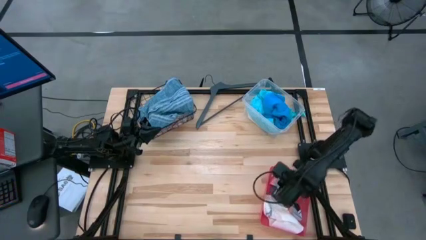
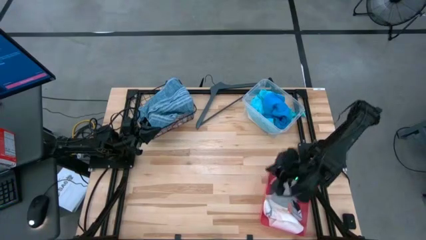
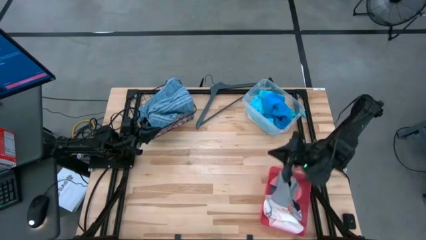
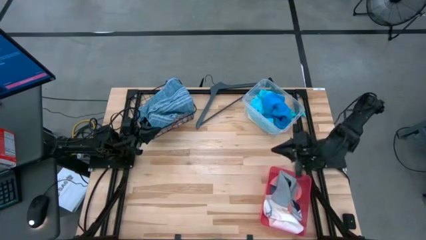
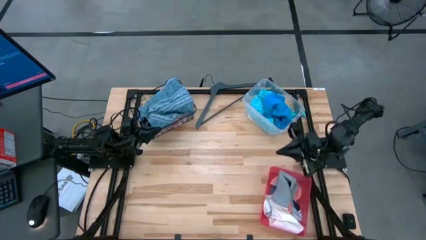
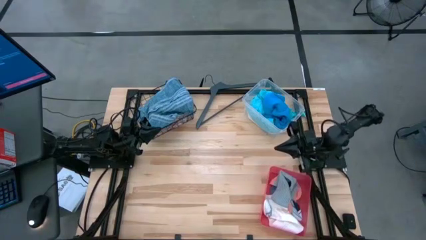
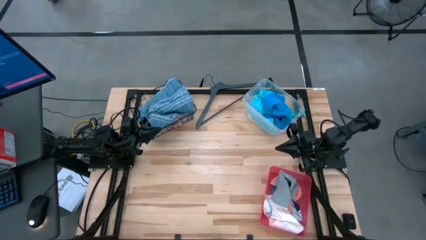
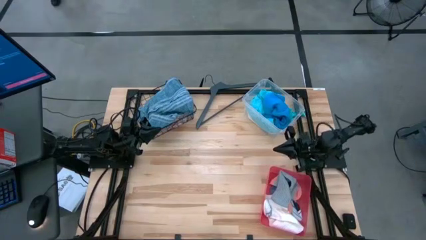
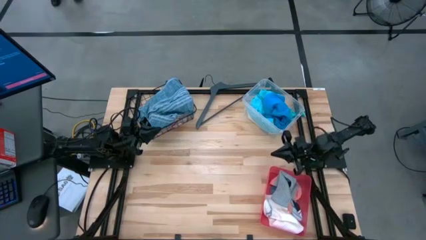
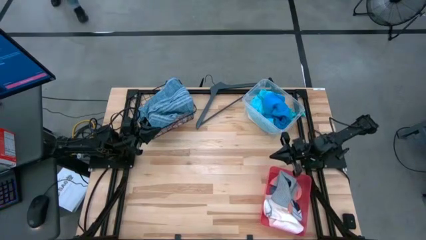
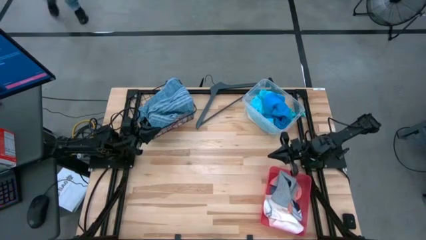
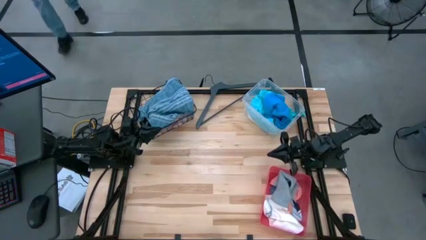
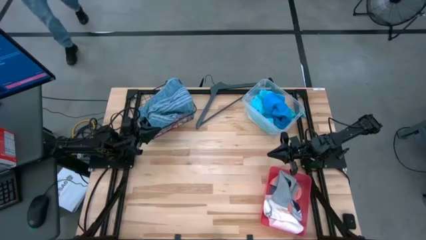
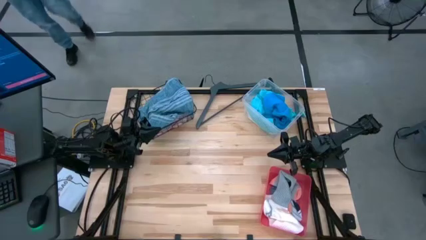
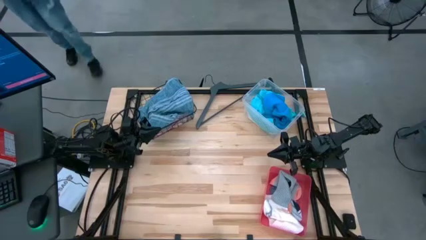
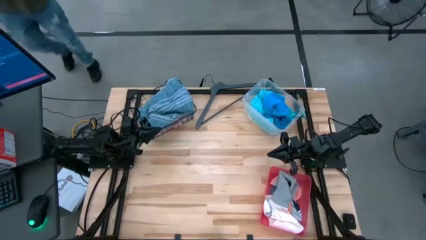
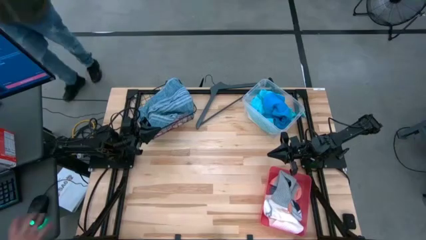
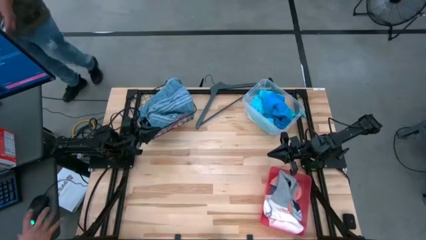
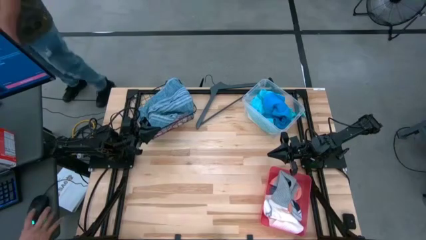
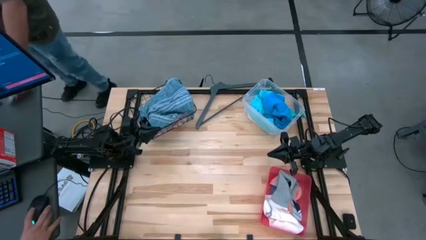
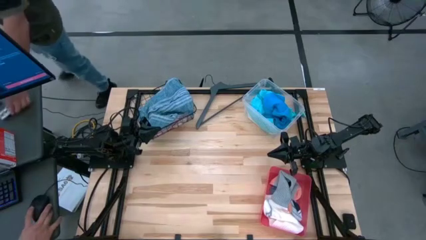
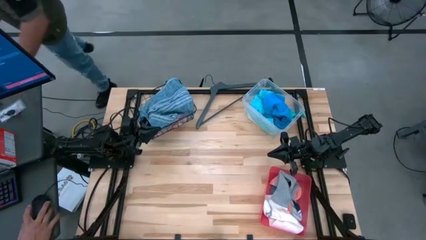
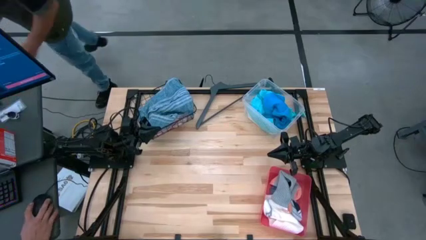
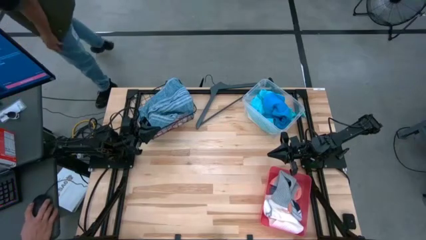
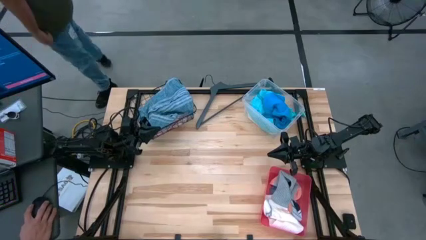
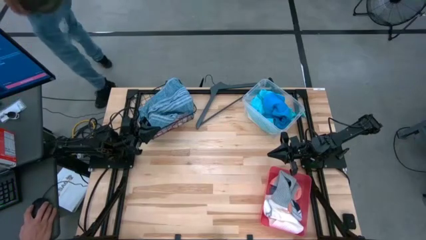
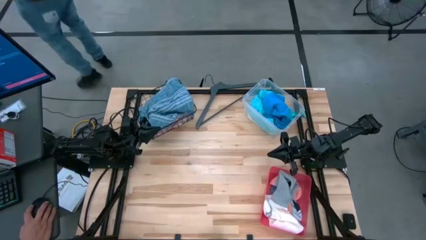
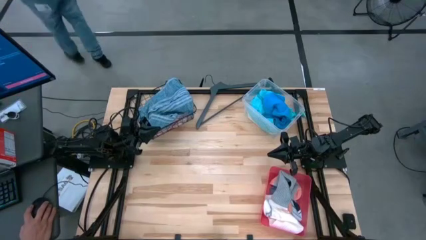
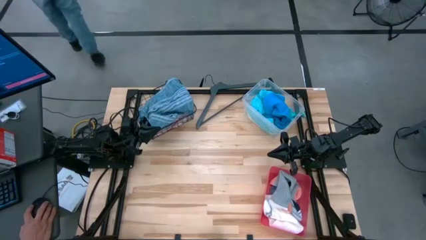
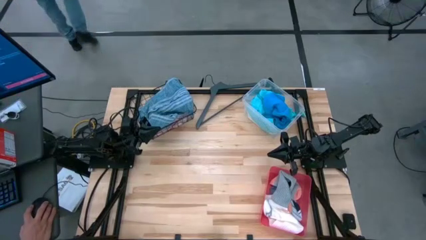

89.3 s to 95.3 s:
Task: Pick & Place Cloths
Return to Home Position

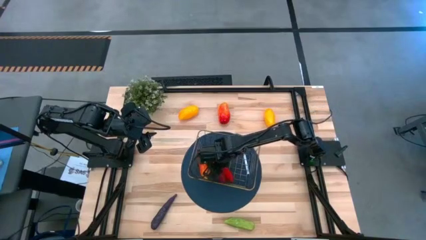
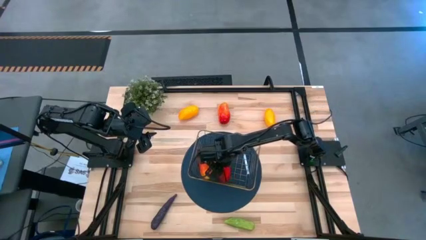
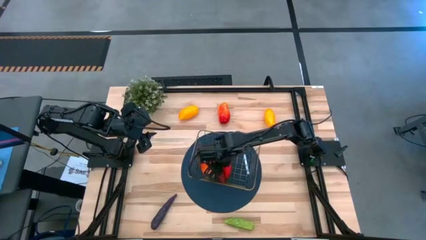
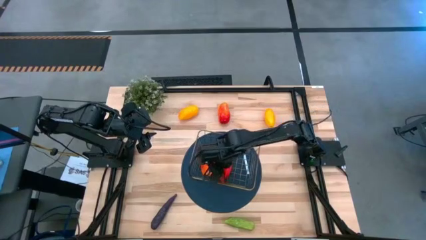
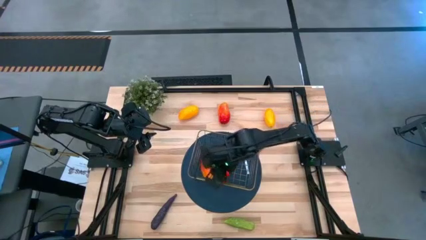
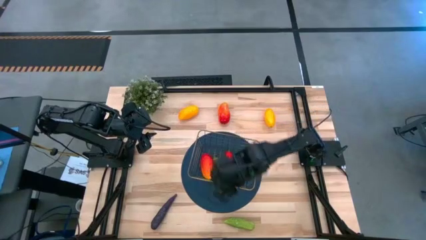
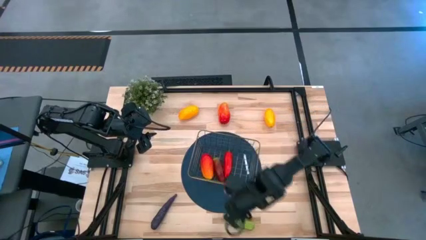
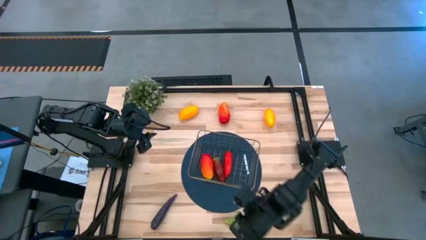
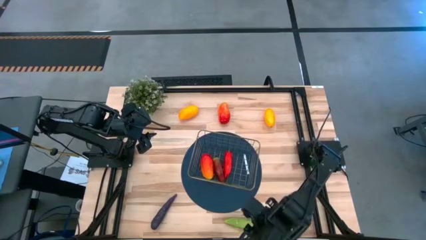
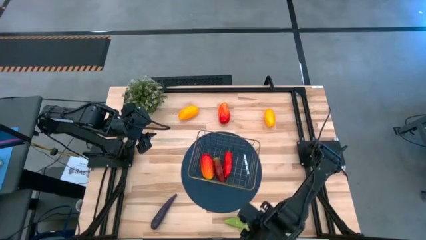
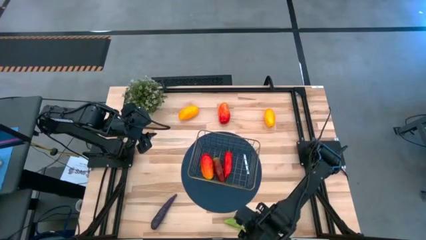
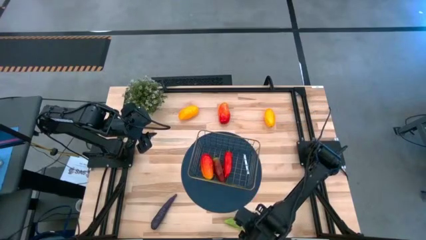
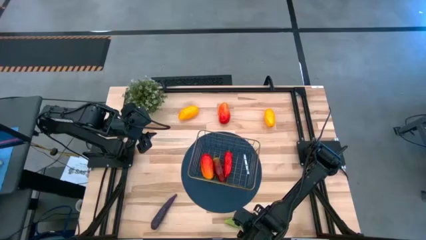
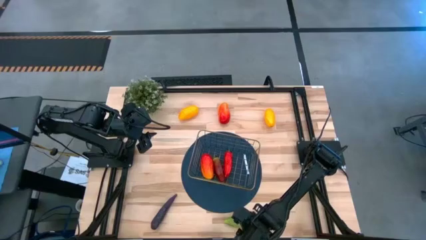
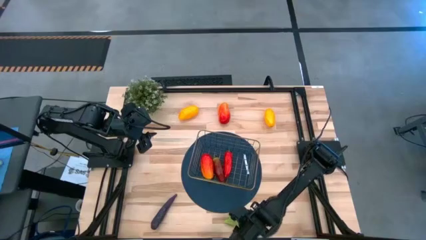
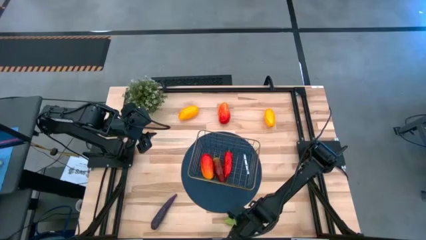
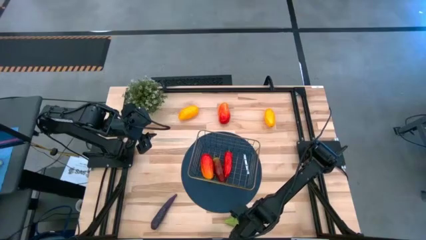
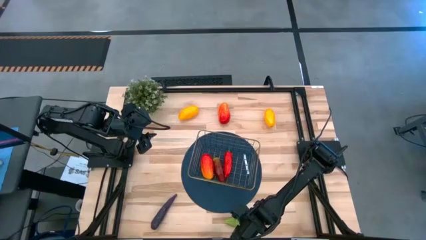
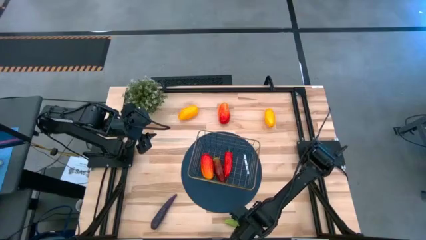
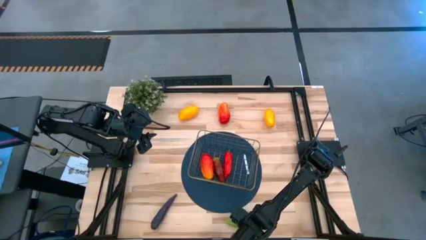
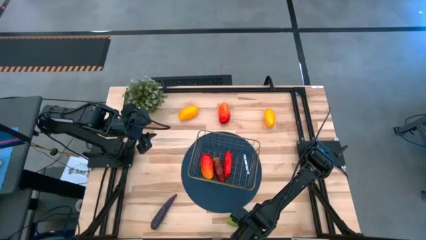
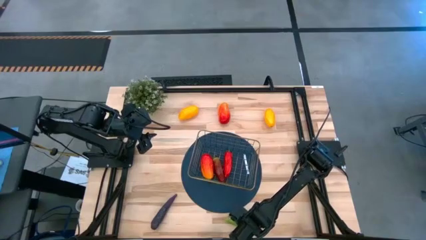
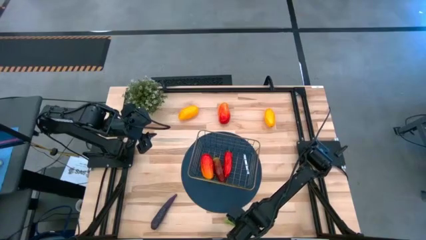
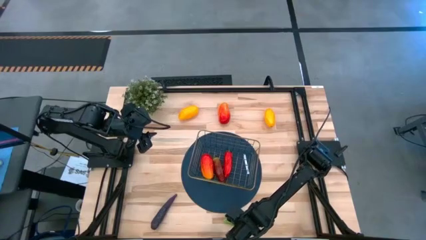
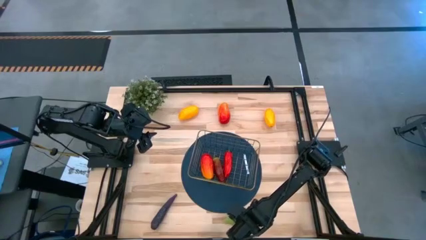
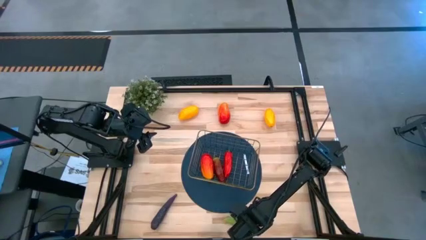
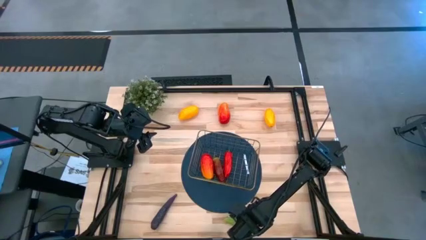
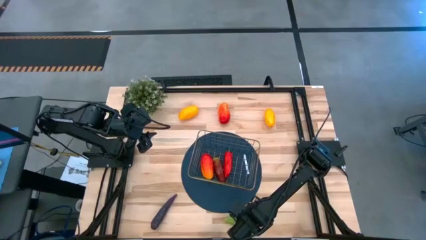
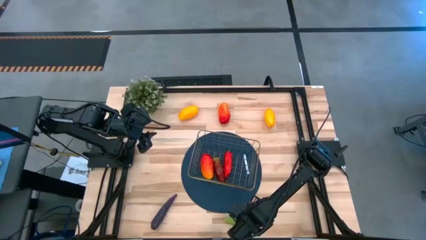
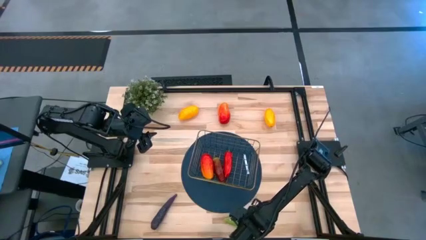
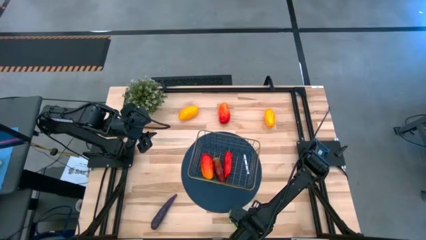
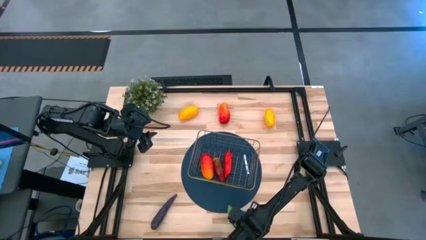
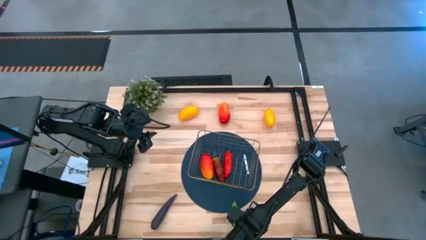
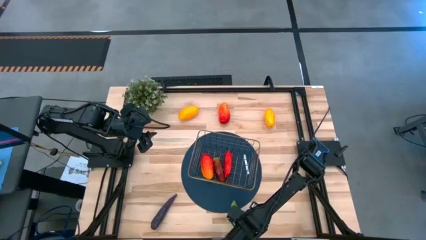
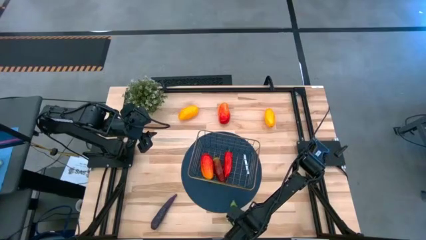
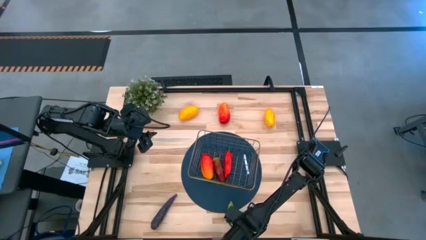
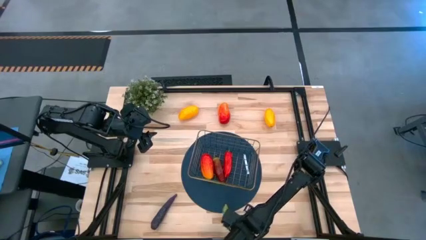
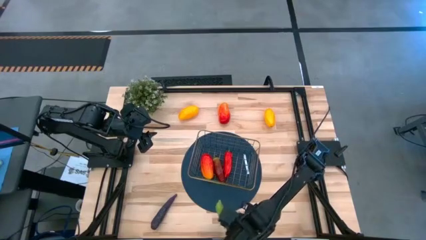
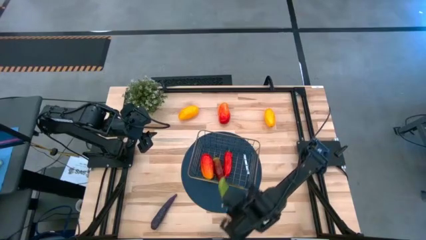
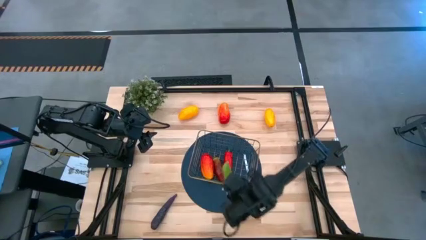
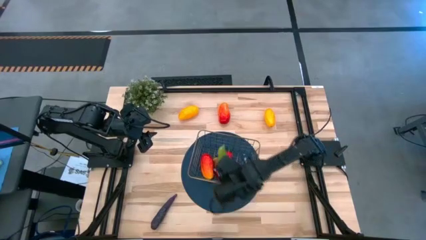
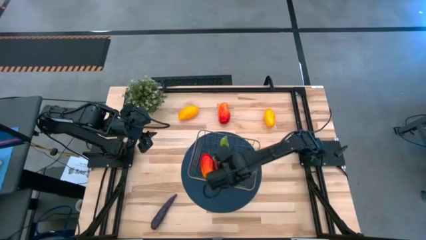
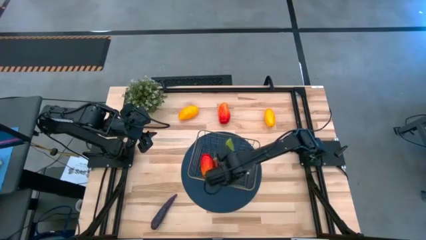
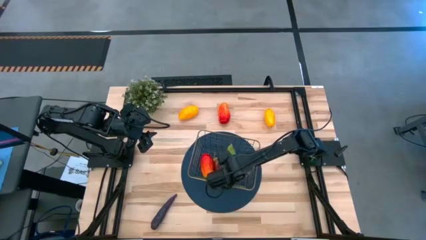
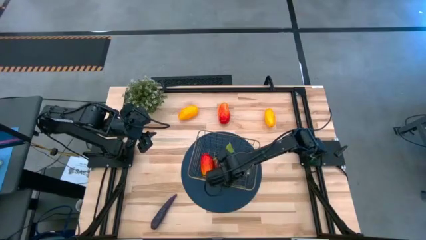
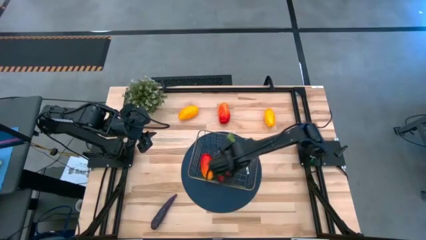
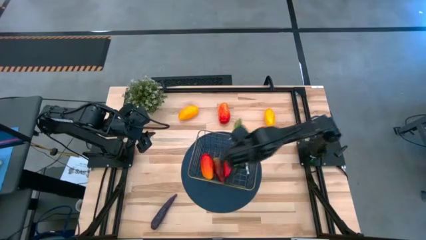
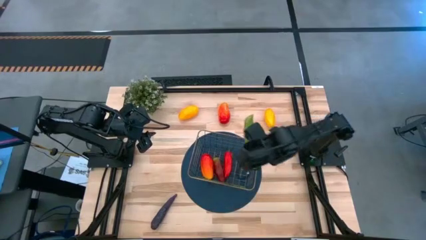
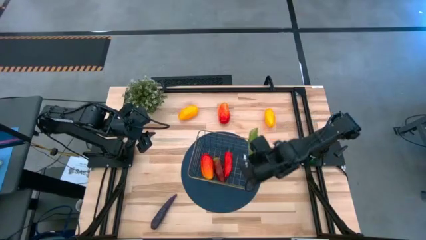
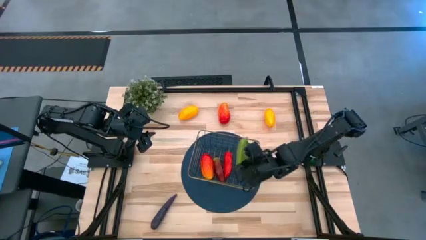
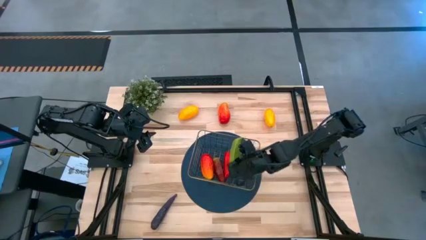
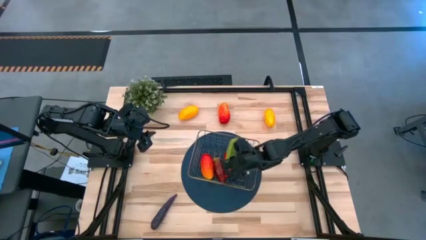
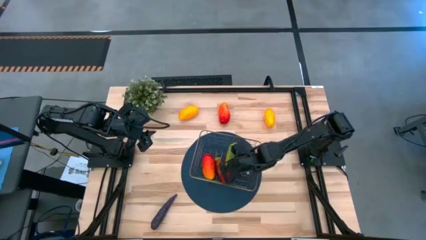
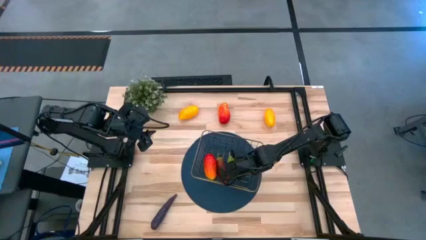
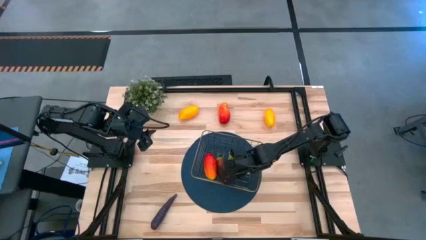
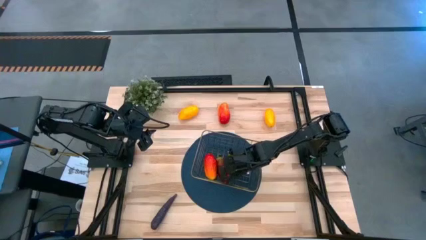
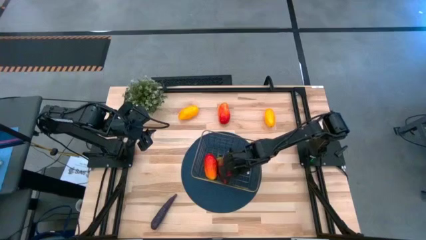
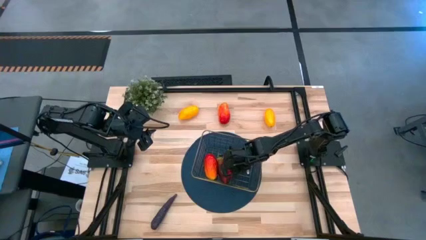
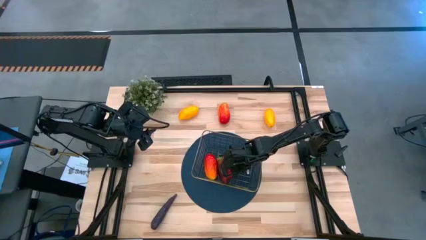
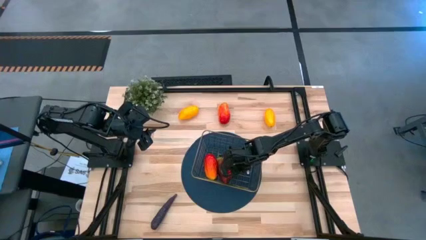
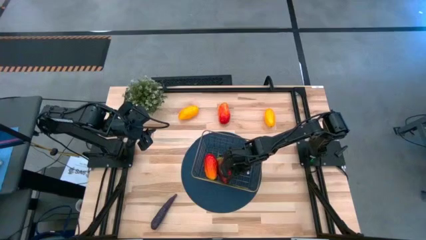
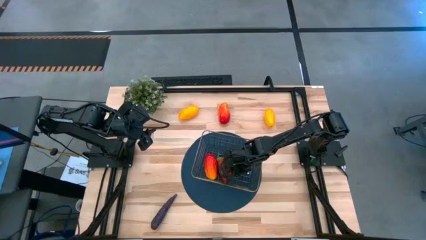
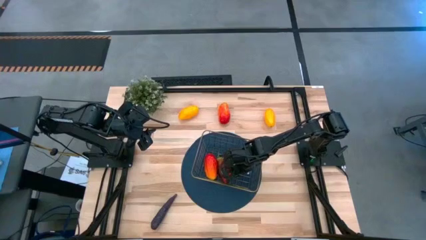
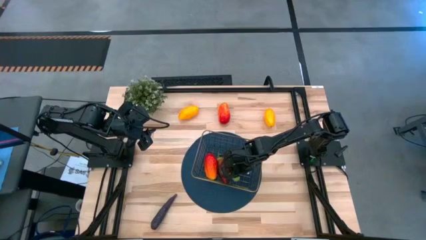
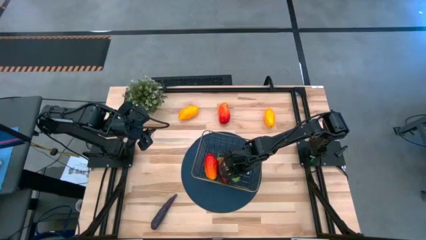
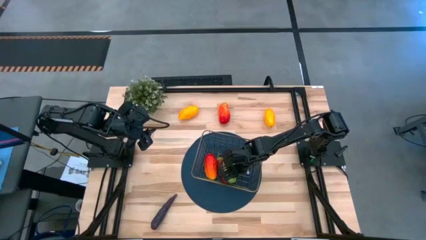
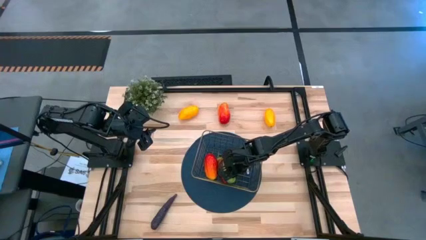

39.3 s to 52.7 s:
Task: Build produce basket
Put the cucumber into the gold wire basket
